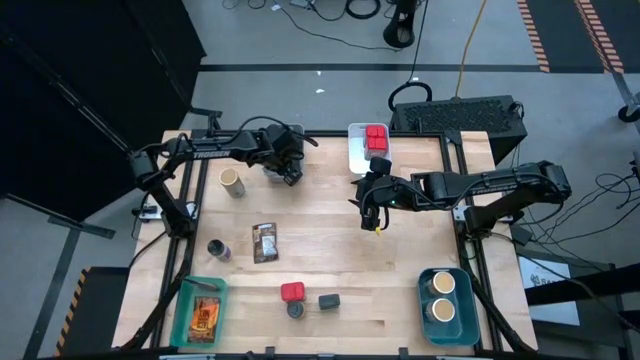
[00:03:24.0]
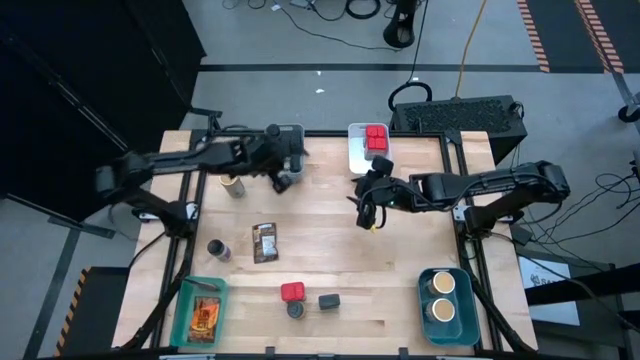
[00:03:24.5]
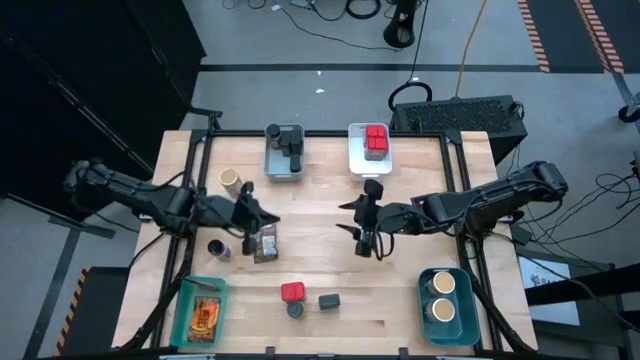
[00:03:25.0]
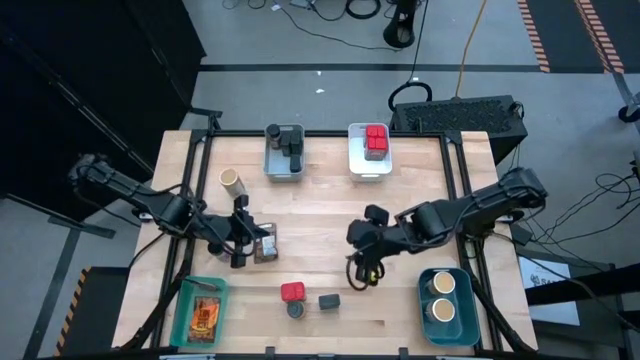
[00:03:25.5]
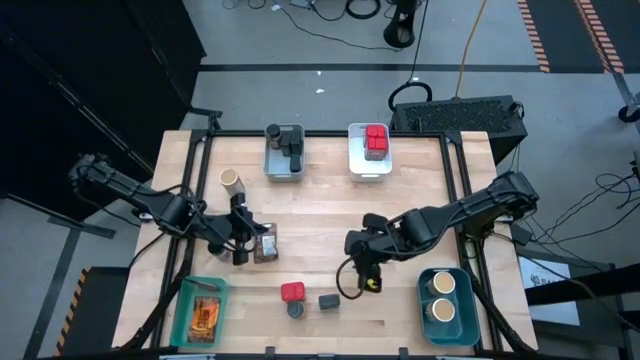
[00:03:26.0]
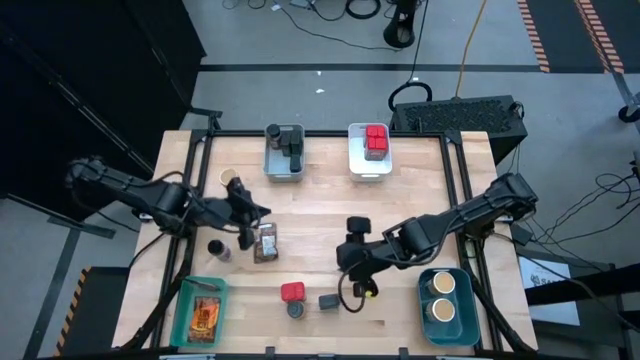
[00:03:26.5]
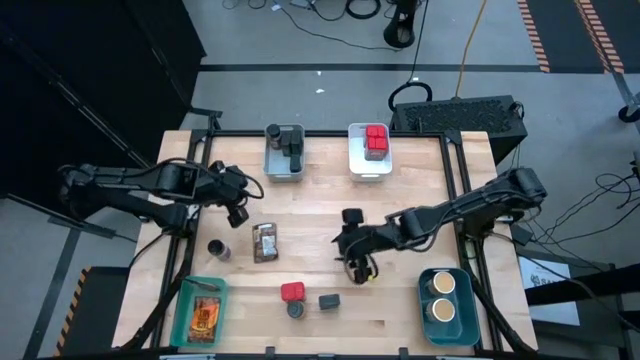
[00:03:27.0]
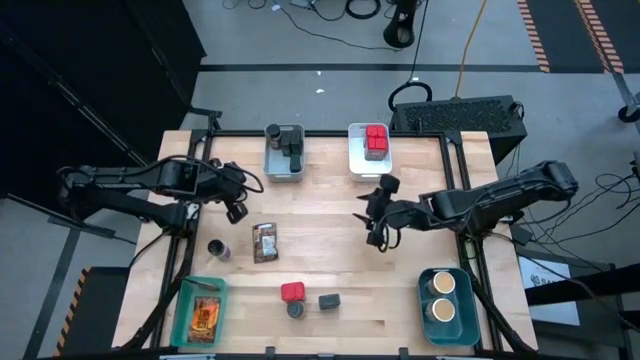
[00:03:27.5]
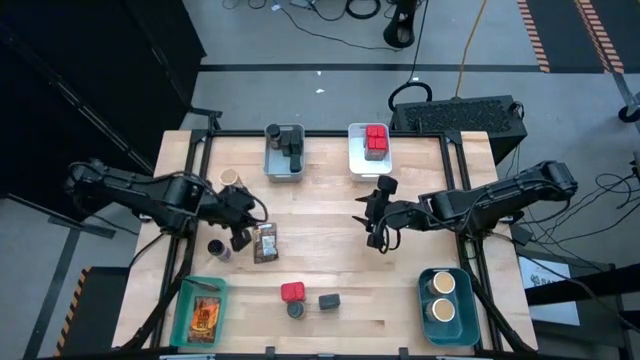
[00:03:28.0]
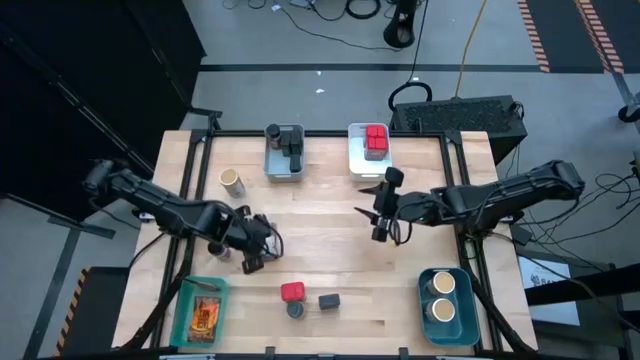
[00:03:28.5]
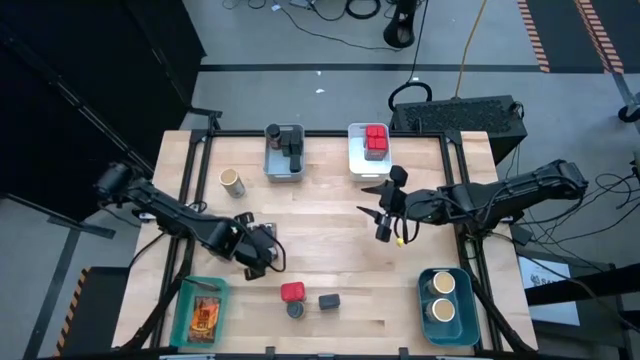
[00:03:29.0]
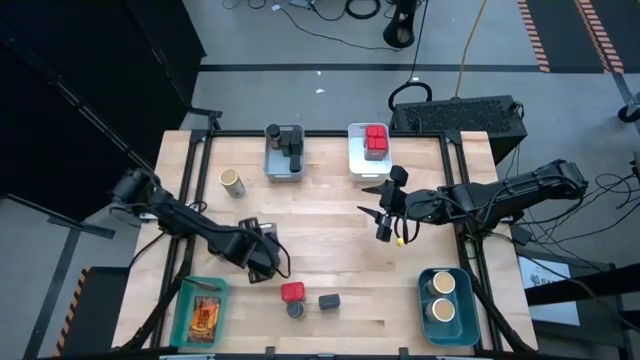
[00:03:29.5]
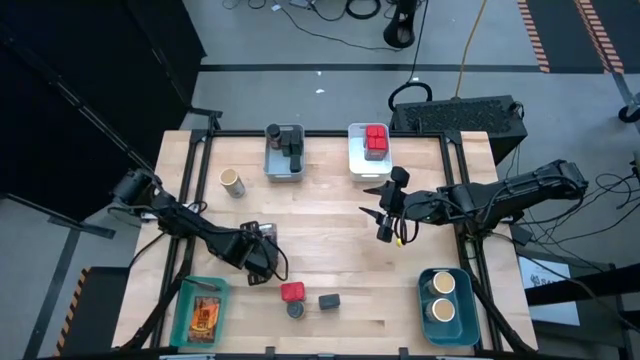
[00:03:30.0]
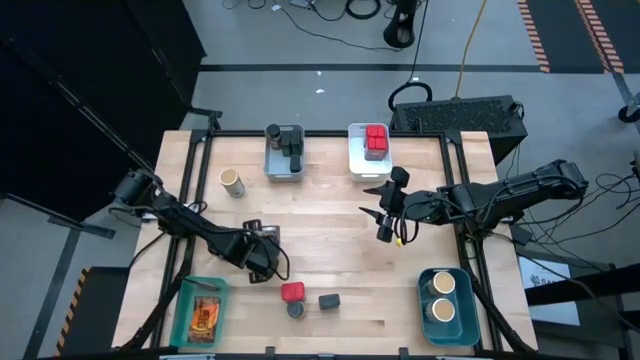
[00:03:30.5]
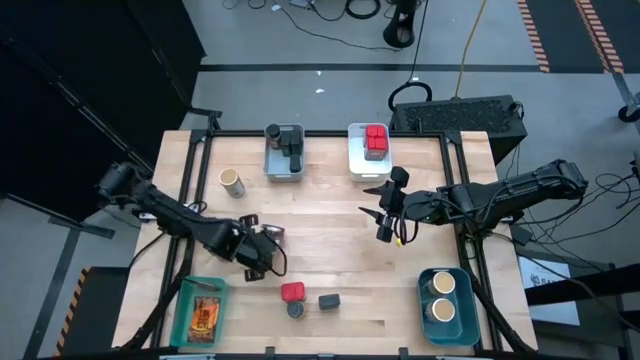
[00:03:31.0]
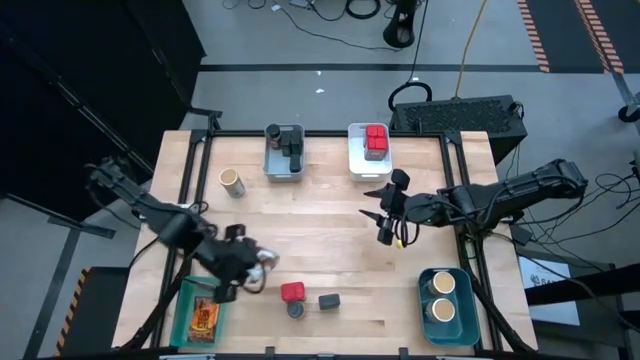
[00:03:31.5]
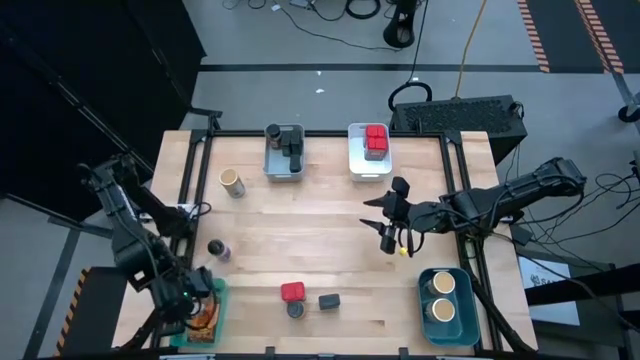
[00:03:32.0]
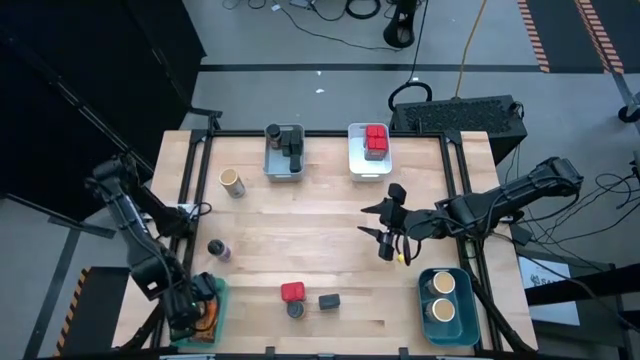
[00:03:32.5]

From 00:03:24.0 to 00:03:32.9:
Task: Sort spices by type
Put the orange spice pack into the green bin

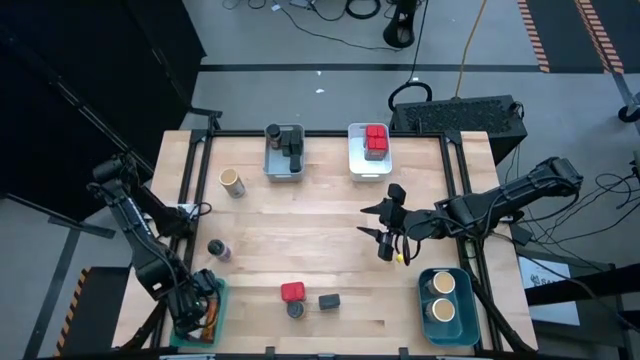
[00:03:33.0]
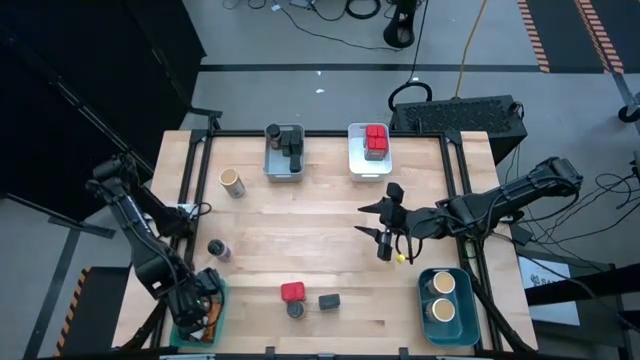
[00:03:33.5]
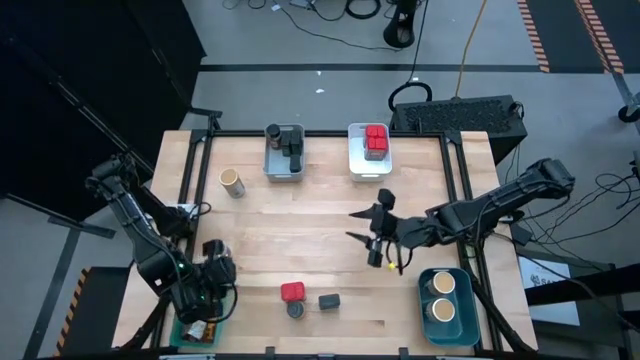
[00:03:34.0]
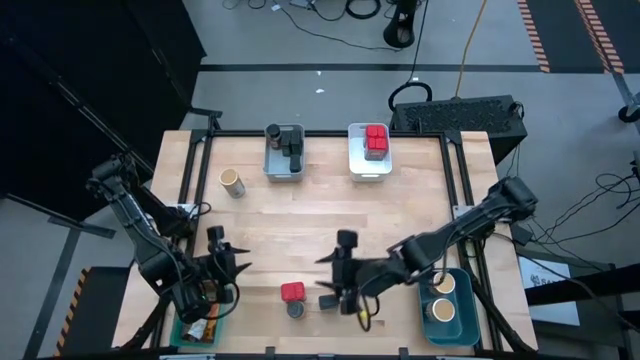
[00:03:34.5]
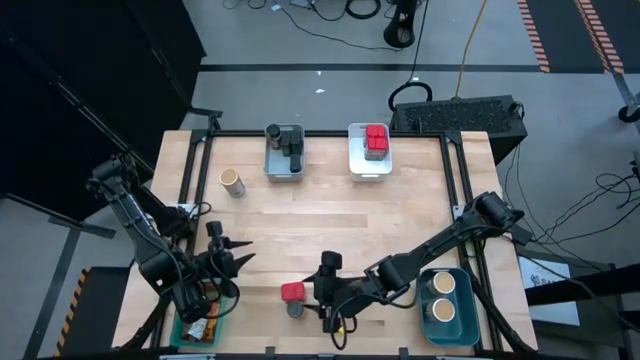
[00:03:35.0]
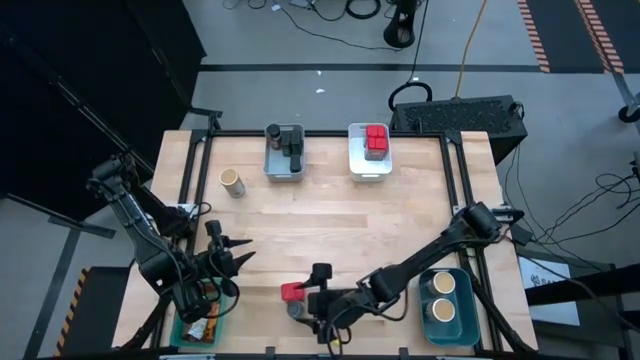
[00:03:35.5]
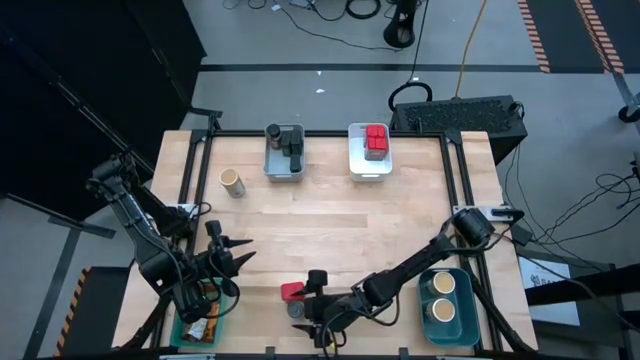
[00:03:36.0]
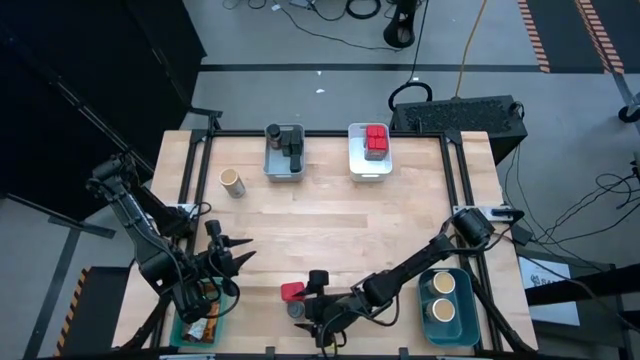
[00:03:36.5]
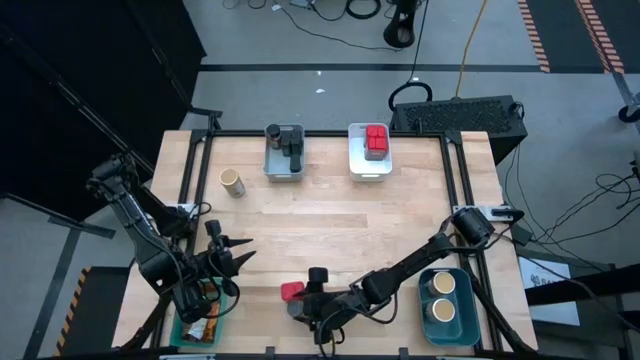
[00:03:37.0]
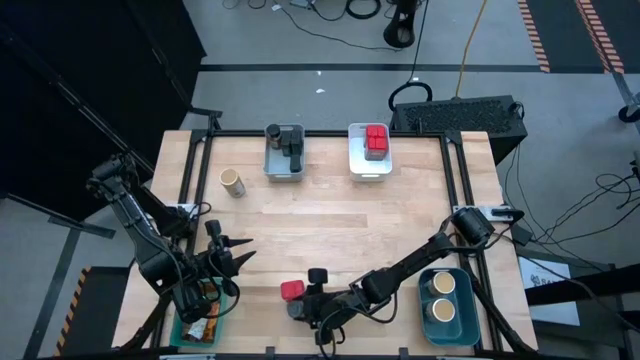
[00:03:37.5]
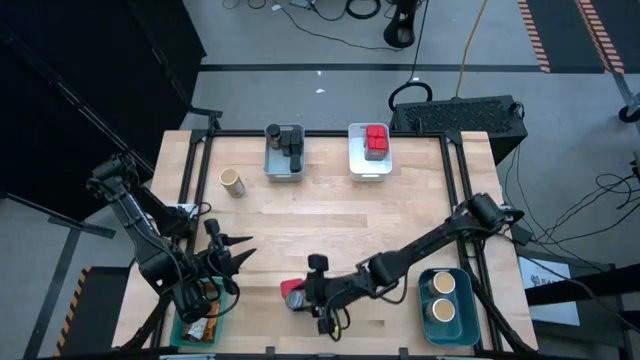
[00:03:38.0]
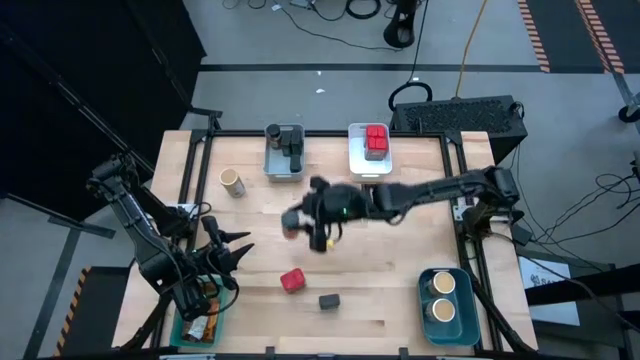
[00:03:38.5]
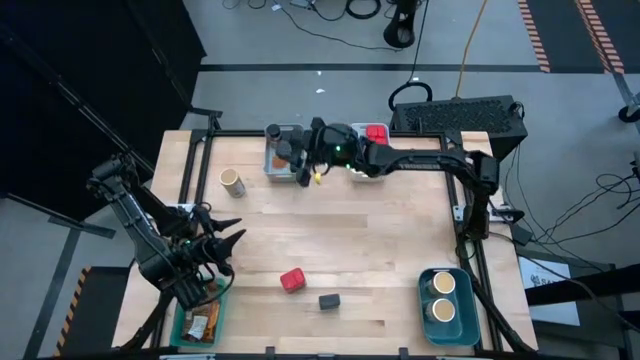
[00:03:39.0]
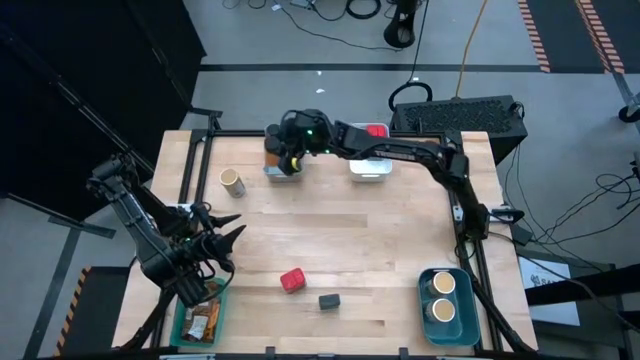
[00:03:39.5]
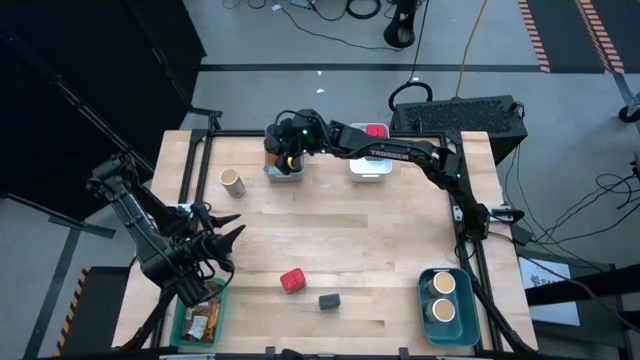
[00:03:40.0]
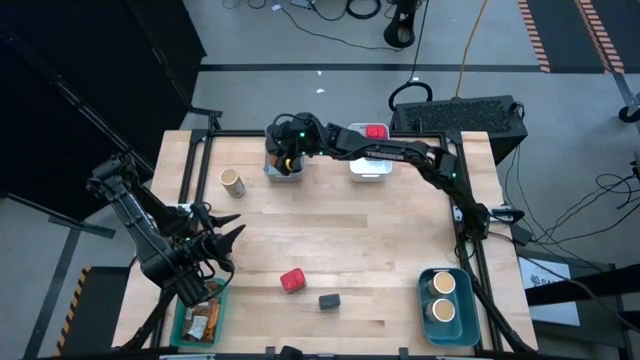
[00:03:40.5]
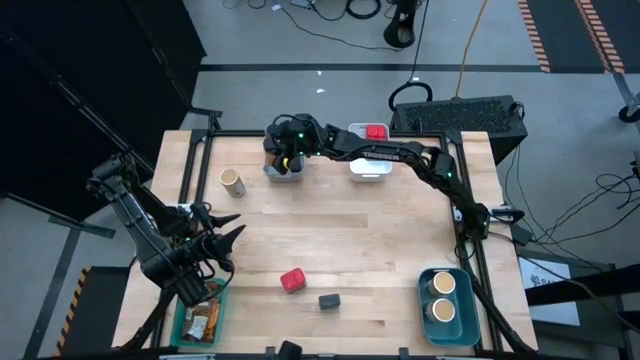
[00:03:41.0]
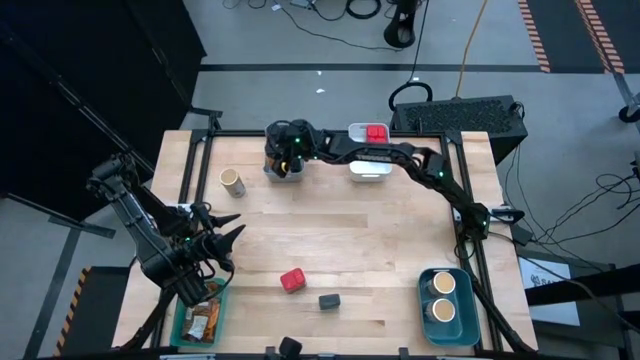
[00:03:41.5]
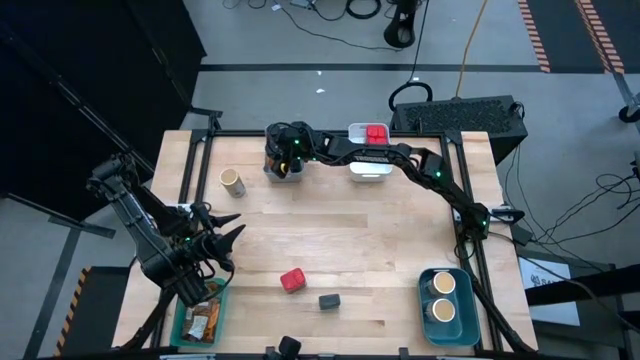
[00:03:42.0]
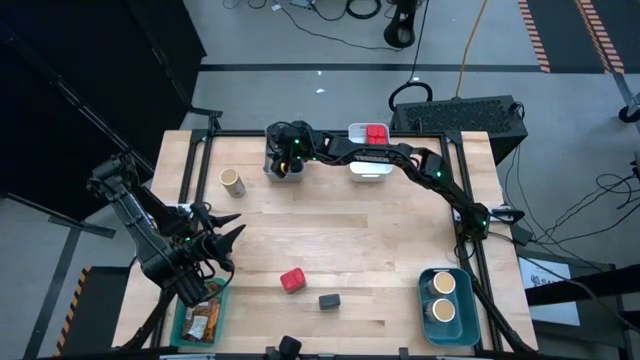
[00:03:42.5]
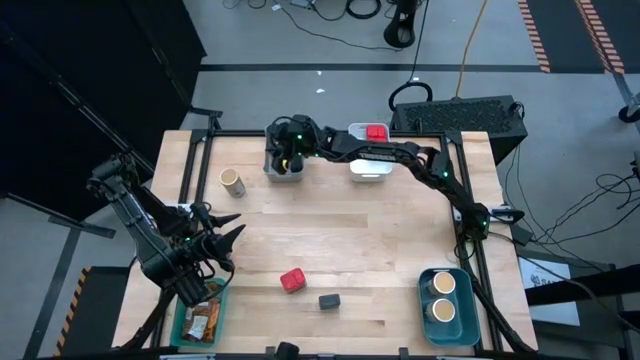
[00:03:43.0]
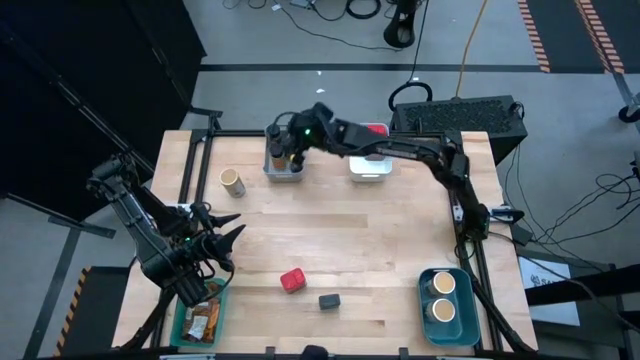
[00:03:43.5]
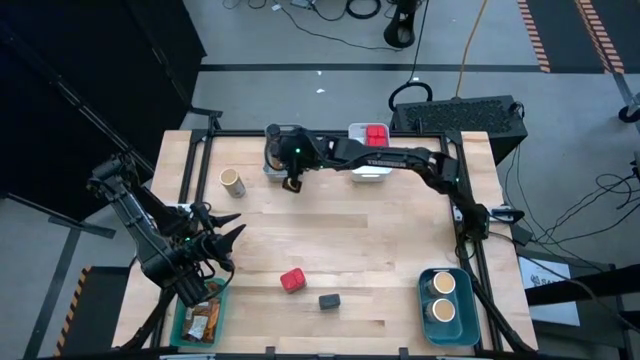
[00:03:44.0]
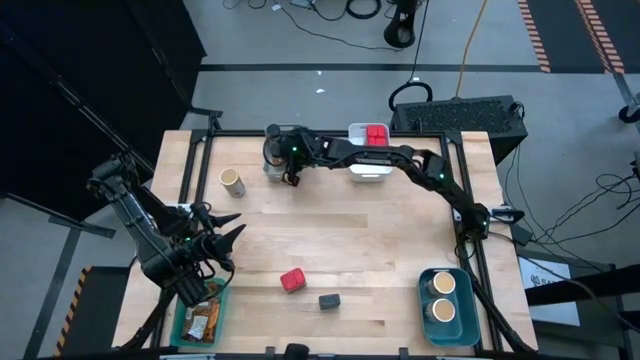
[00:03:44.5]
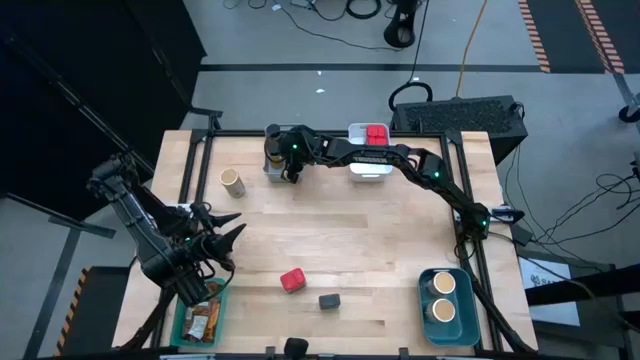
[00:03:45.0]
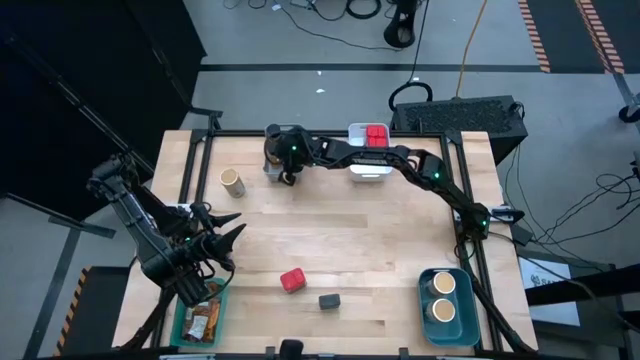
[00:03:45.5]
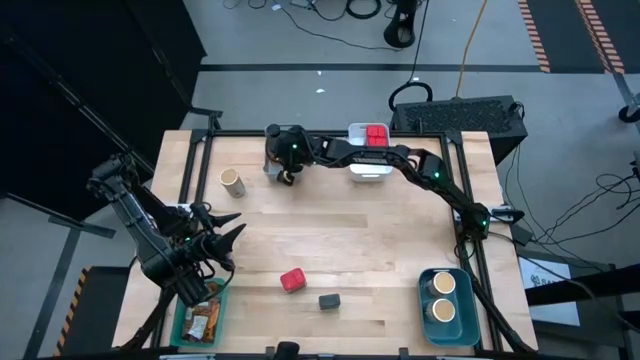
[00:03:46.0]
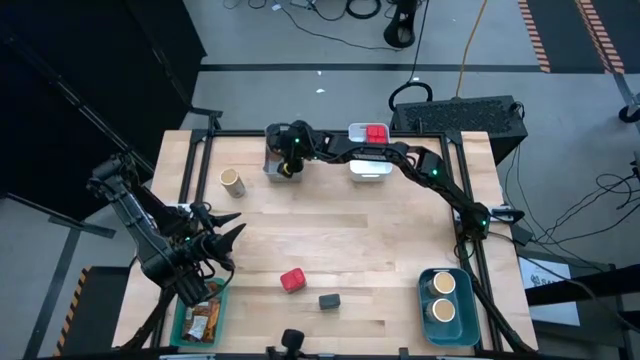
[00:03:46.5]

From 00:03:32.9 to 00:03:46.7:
Put the black spice bottle into the gray bin
